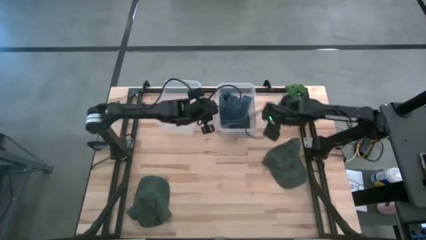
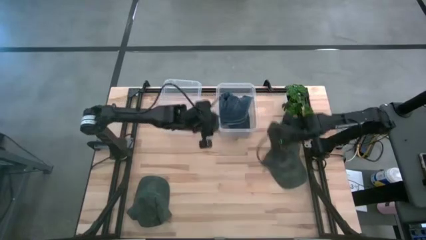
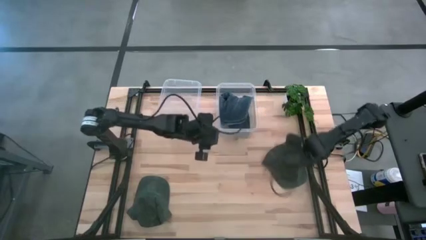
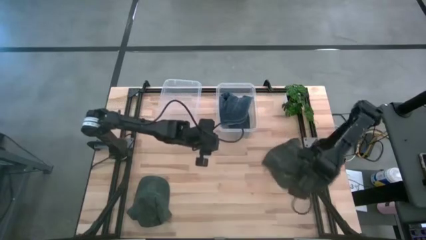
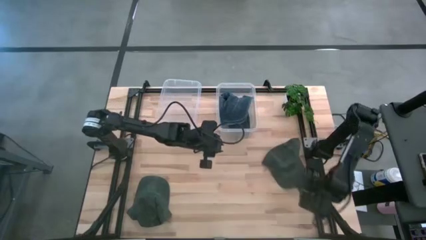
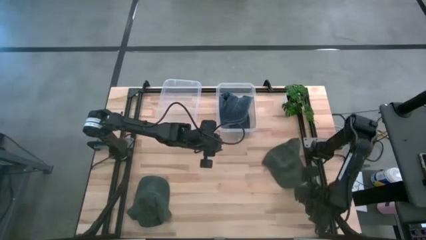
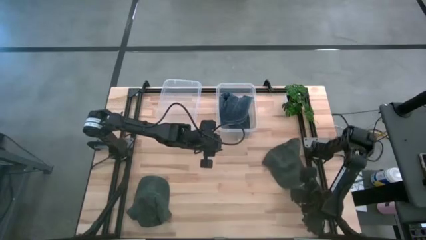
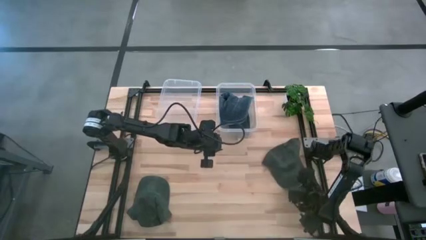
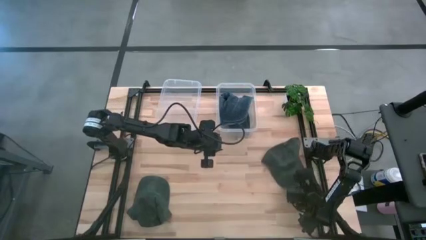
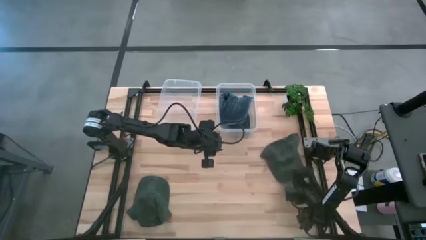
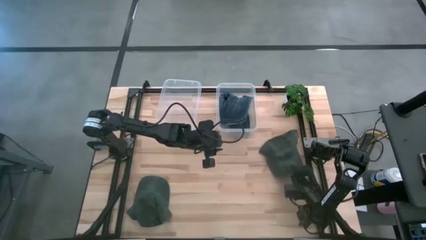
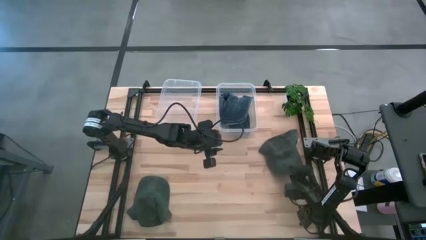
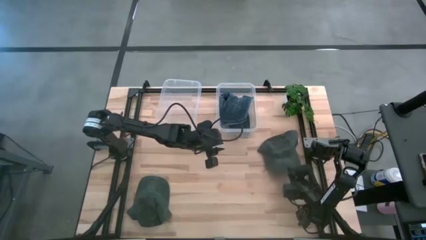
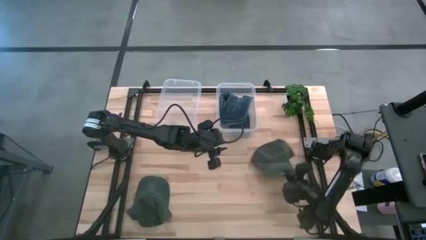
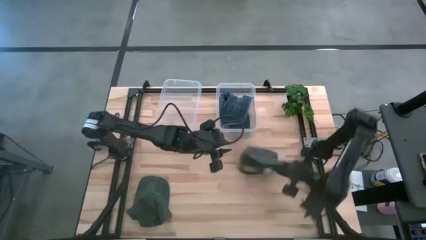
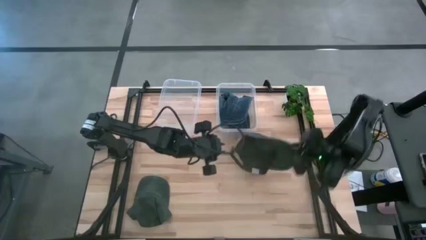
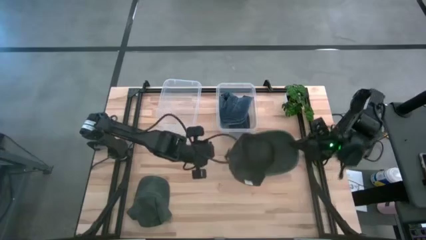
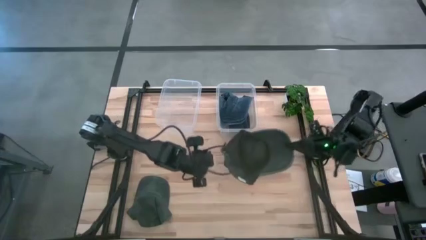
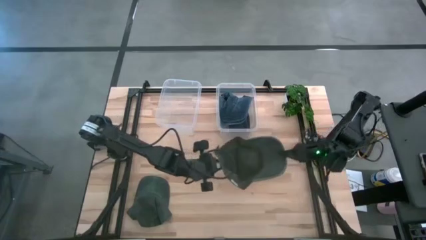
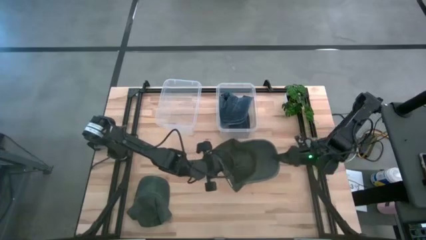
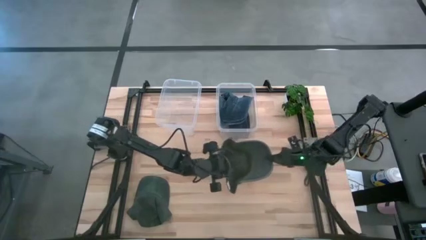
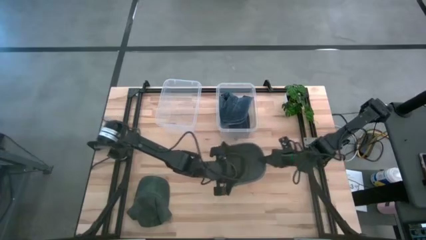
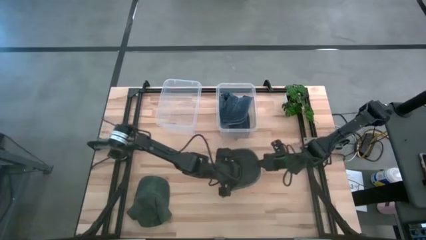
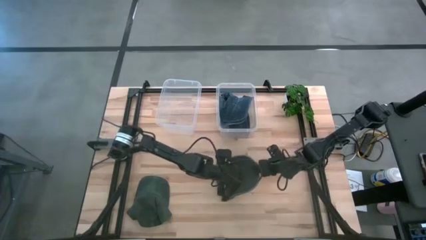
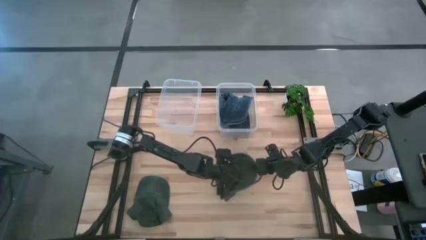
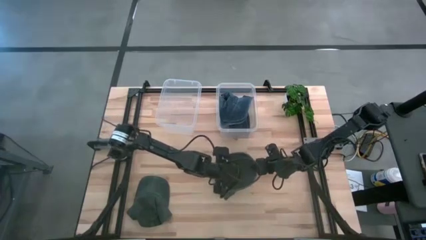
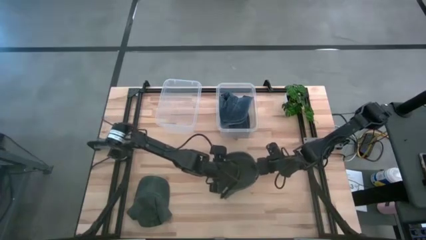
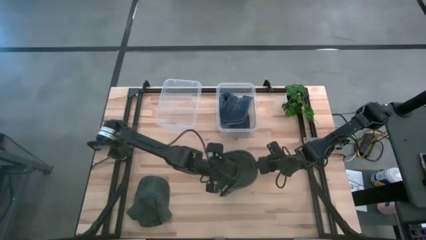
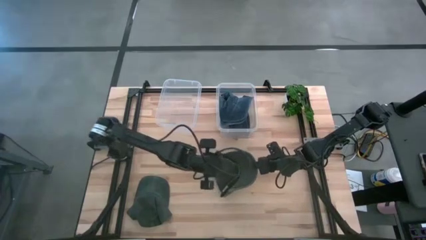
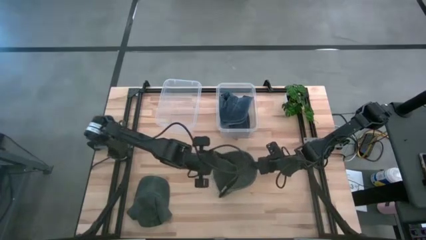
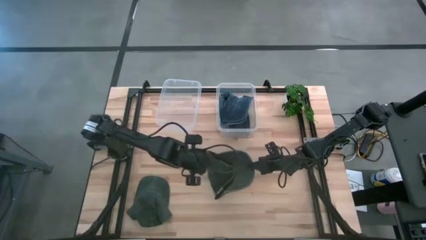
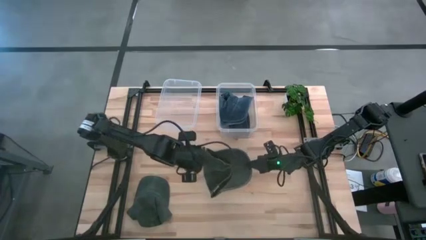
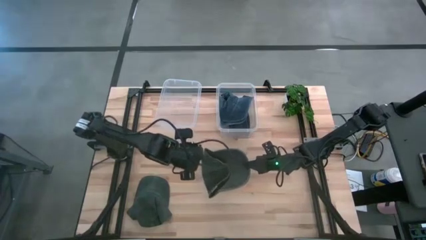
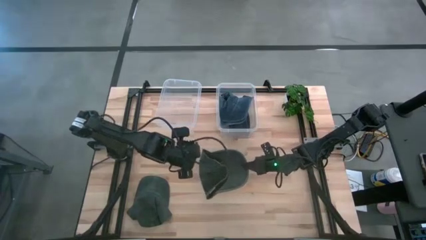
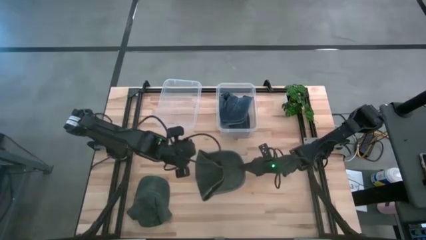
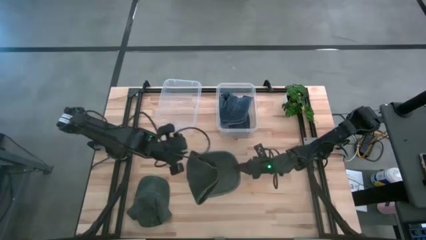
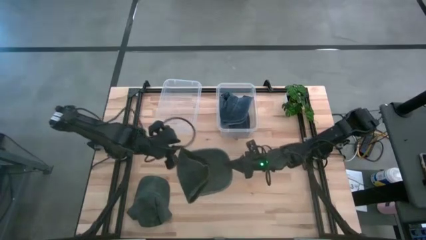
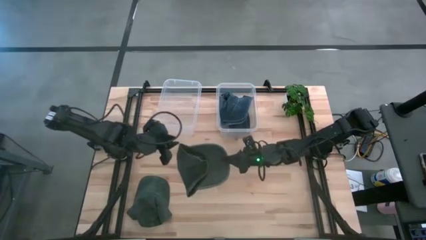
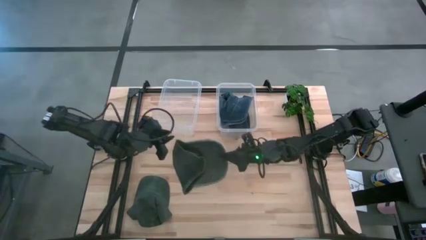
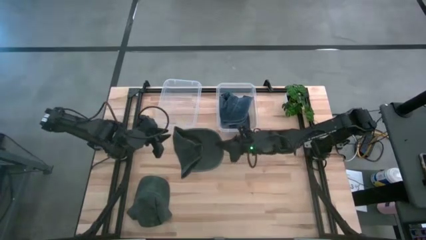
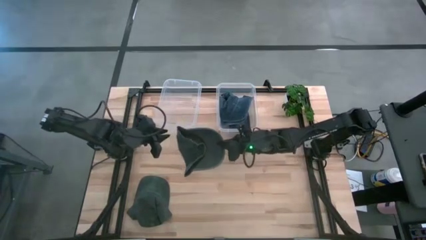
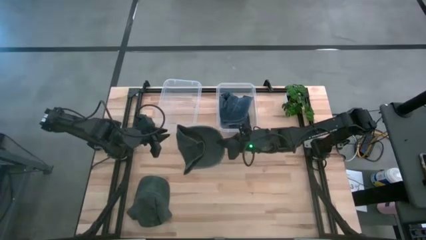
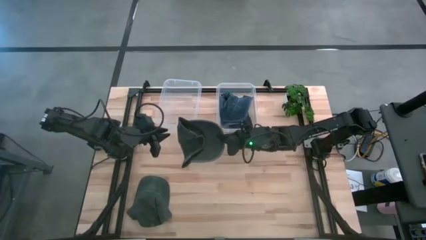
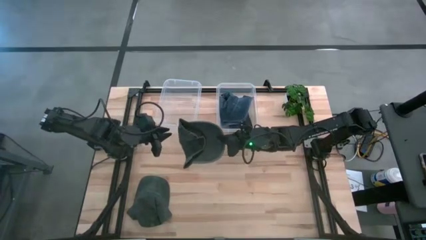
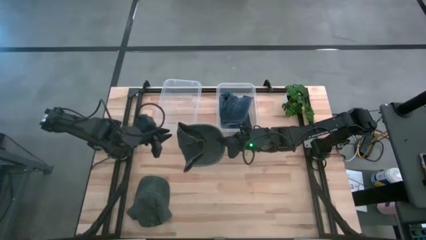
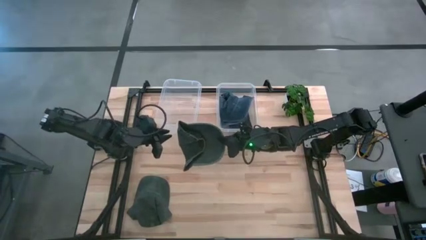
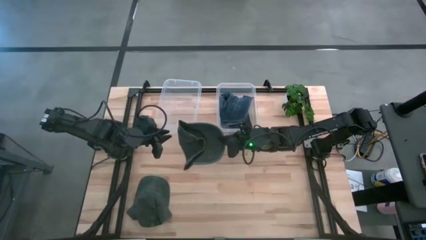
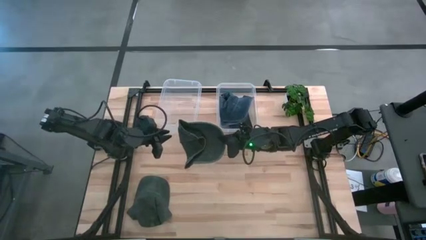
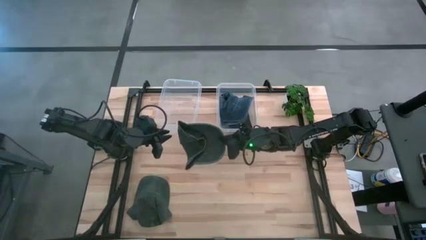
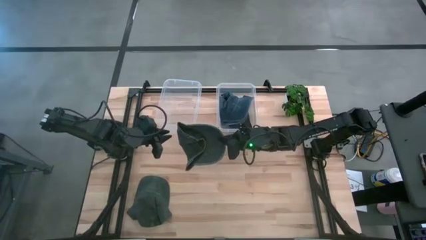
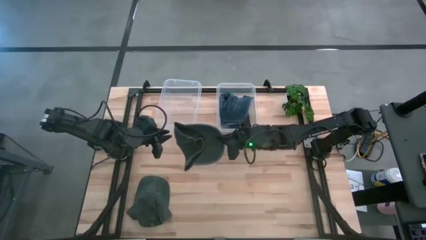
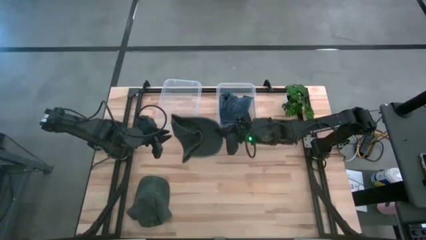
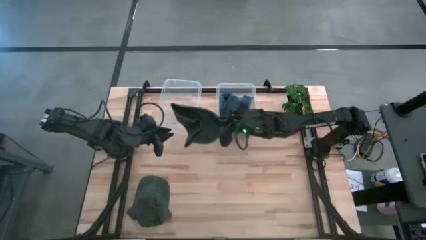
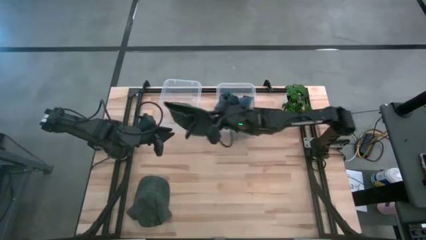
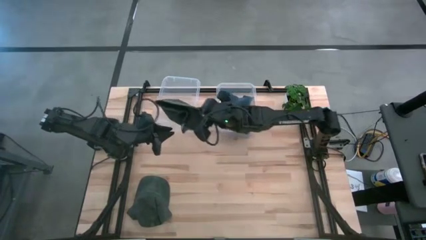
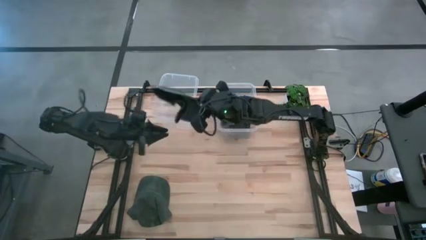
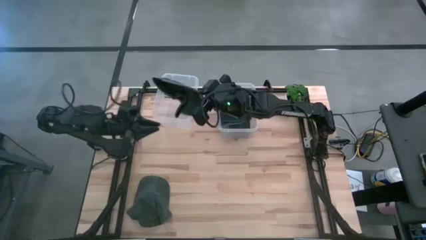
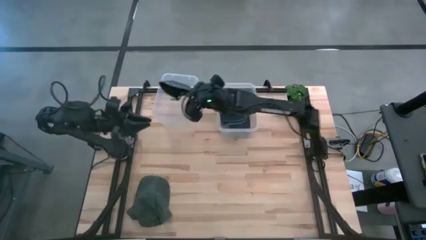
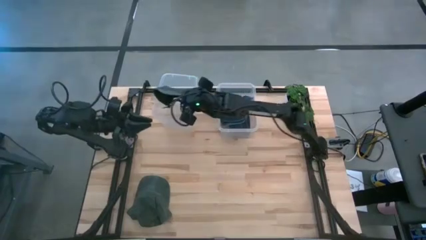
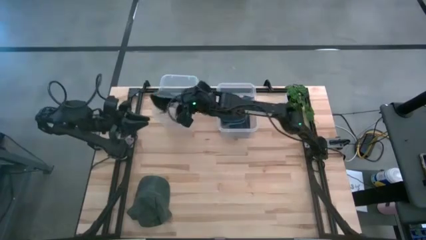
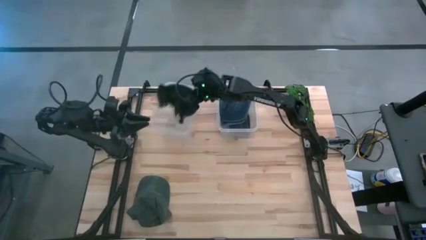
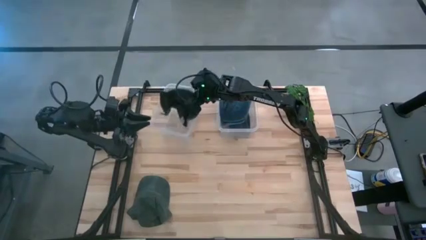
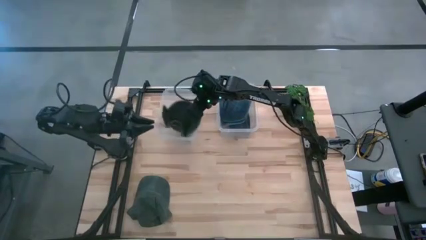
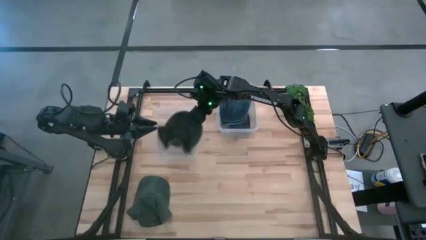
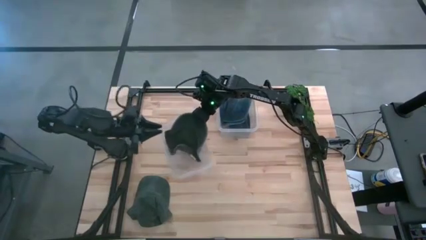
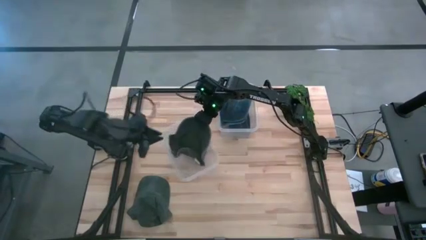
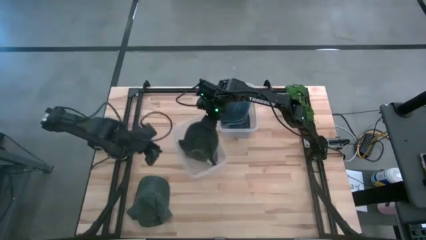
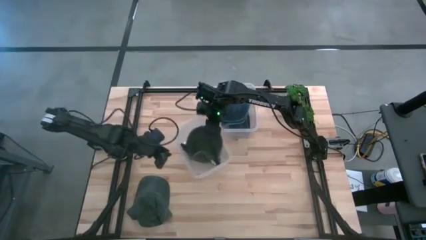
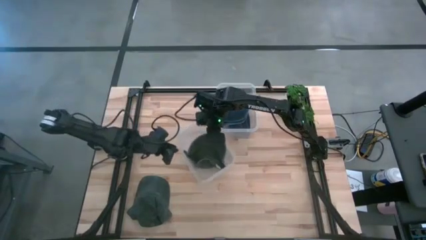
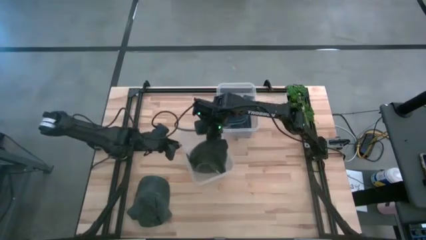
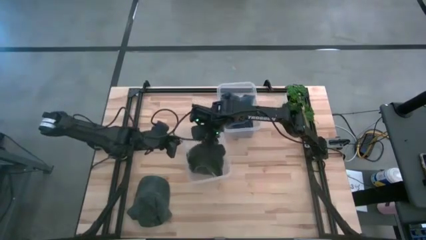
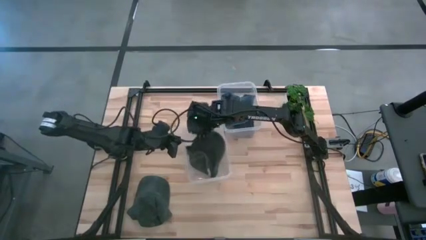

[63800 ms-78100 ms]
Task: Pick & Place hat
Put the top black cap into the left transparent bin
